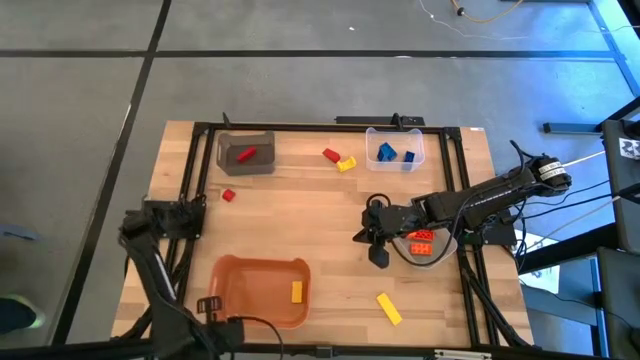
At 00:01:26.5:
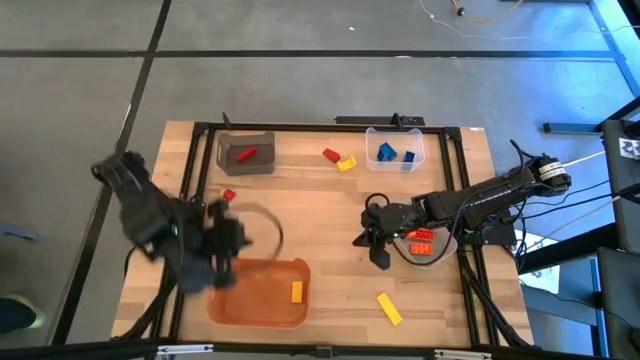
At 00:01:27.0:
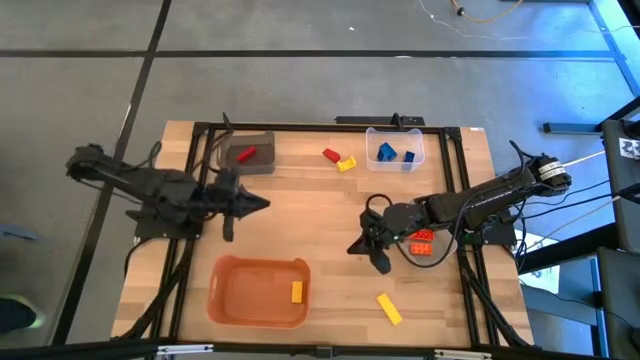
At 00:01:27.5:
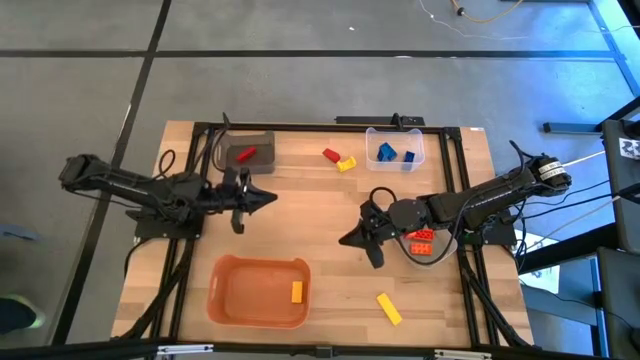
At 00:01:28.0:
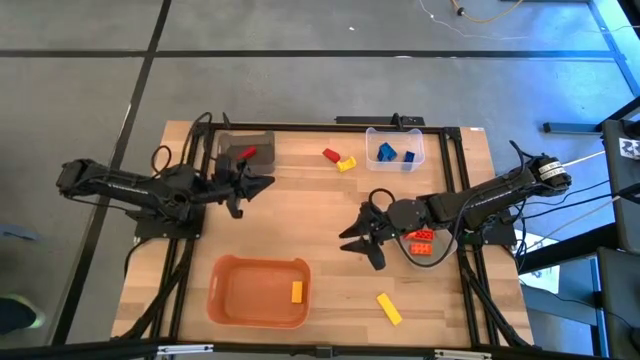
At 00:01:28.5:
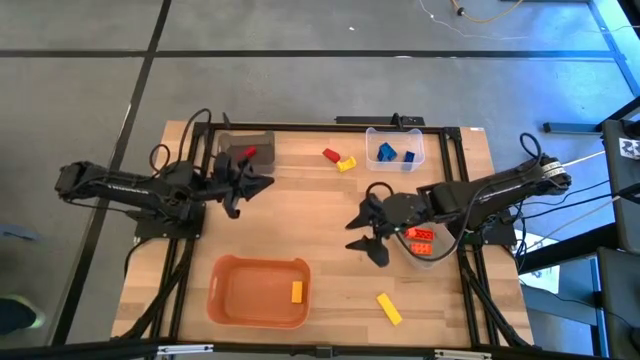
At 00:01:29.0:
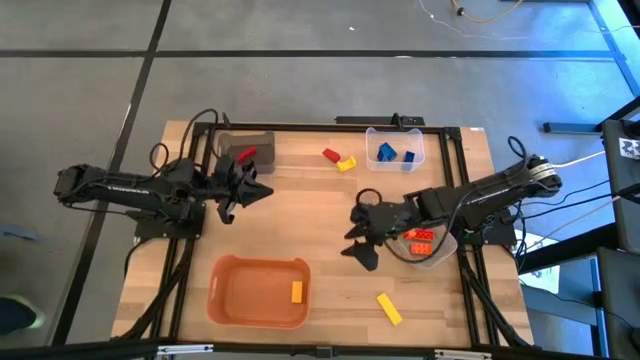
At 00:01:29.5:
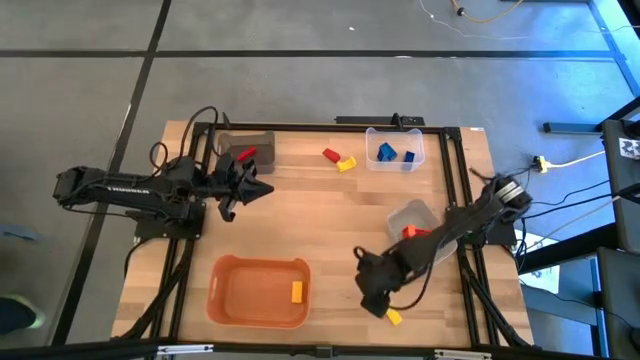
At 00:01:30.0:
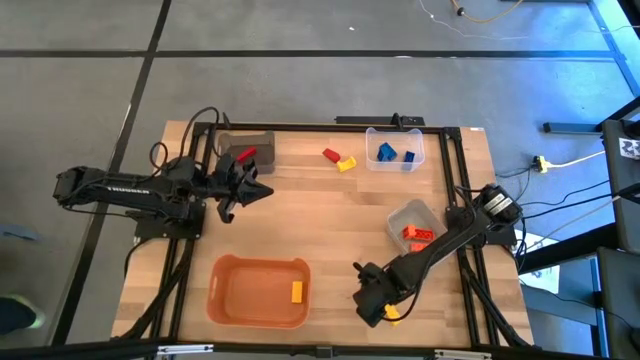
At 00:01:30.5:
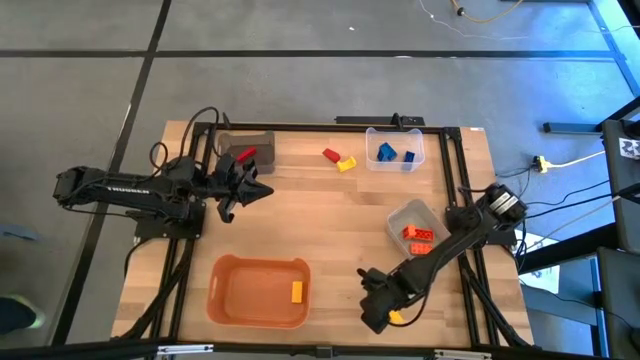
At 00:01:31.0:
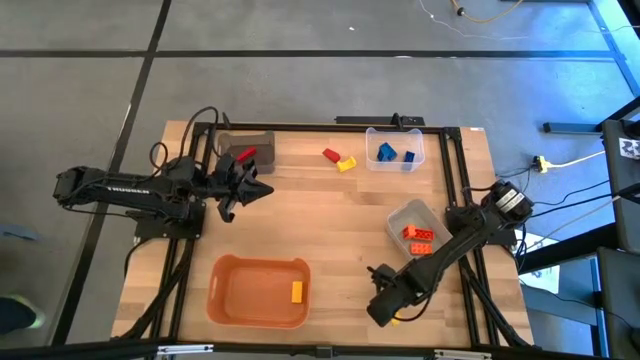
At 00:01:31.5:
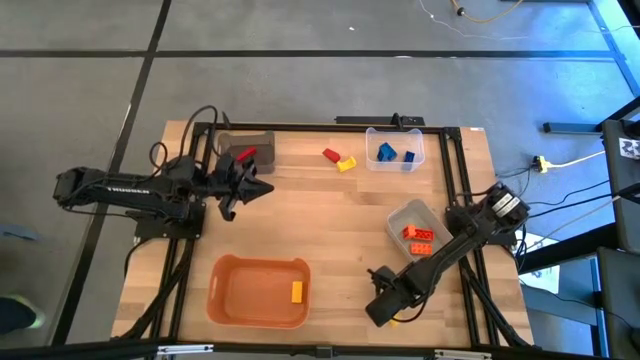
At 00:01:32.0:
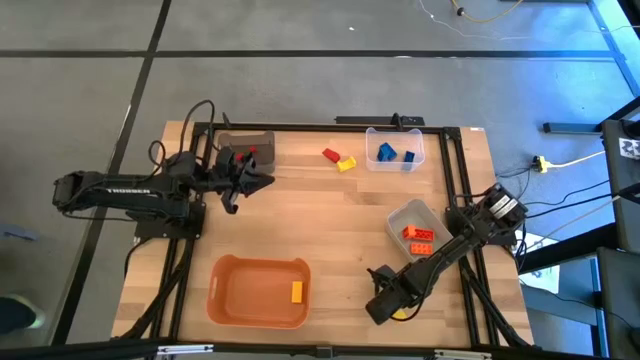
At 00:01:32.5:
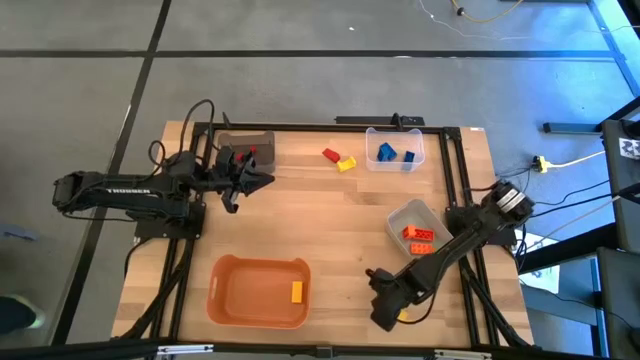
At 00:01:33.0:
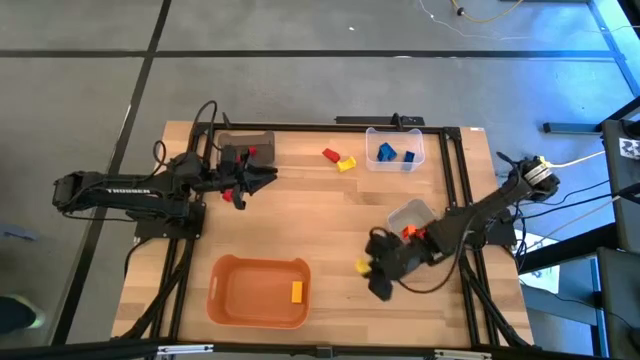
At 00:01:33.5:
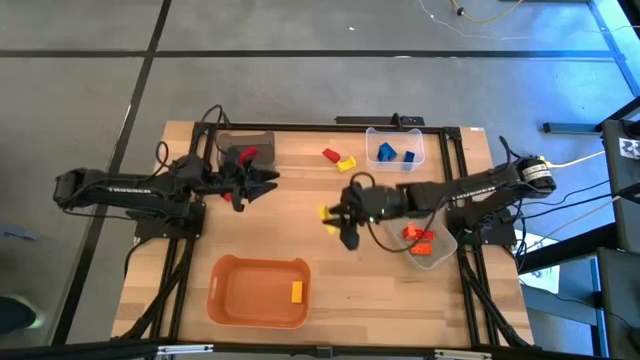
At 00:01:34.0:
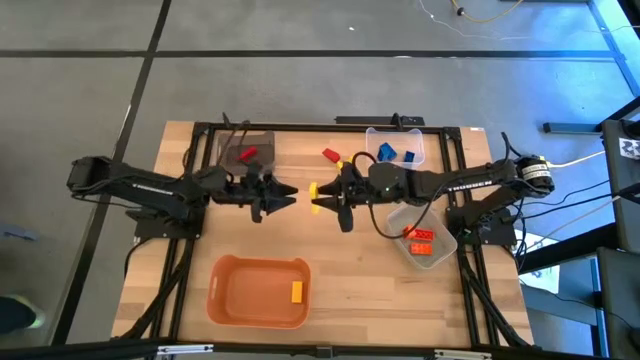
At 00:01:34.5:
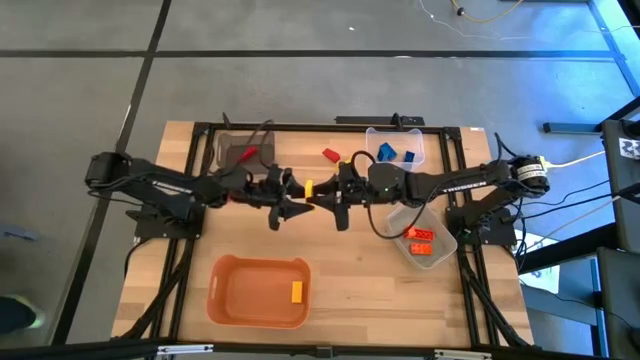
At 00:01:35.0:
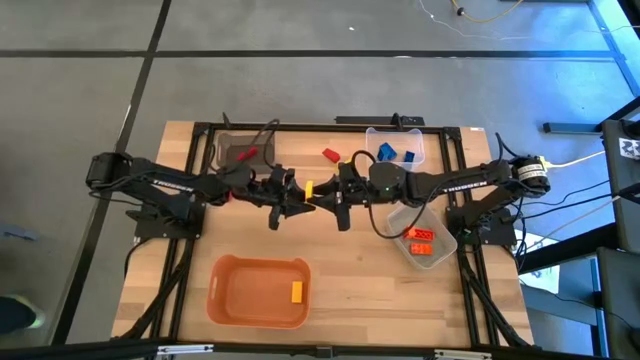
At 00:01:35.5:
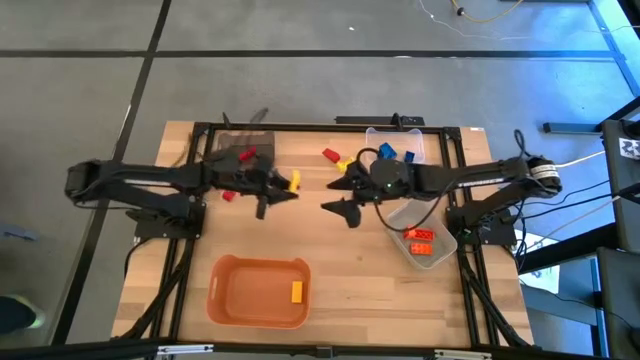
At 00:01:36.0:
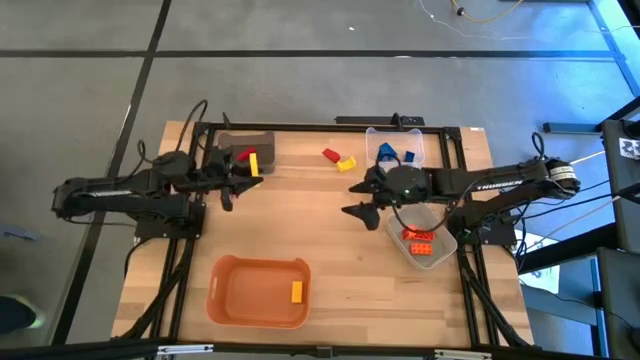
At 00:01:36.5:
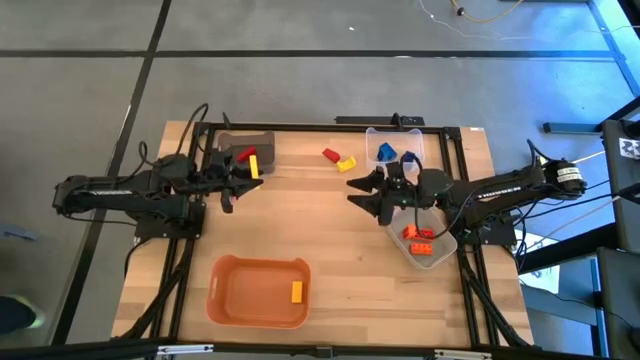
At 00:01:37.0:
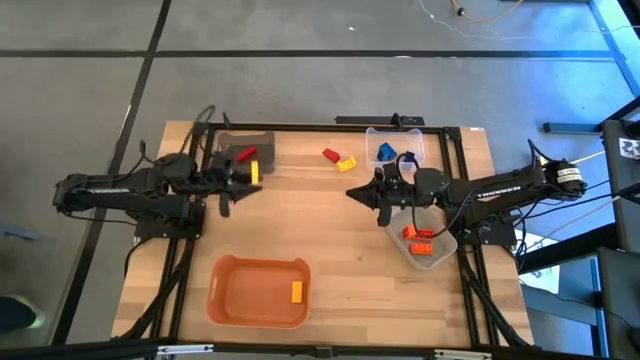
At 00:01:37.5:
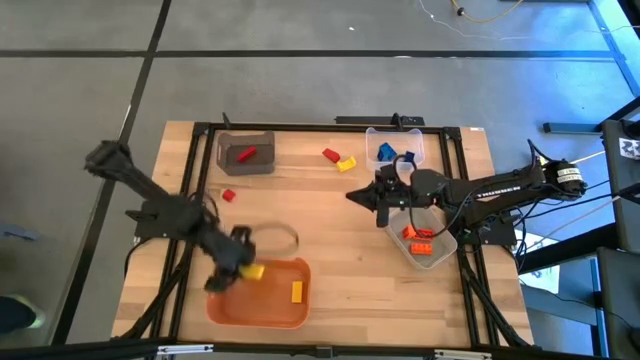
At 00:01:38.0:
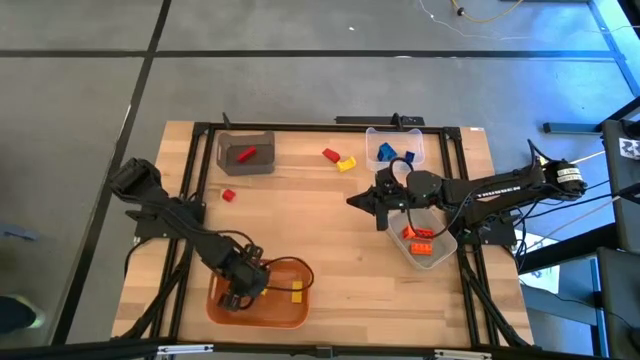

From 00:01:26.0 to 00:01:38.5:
Task: Sort & place blocks by color
Put the bottom yellow block into the orange bin

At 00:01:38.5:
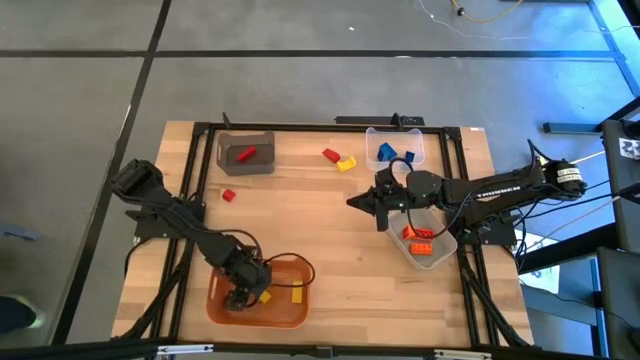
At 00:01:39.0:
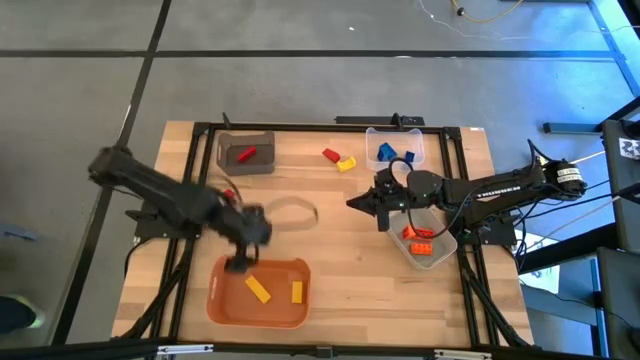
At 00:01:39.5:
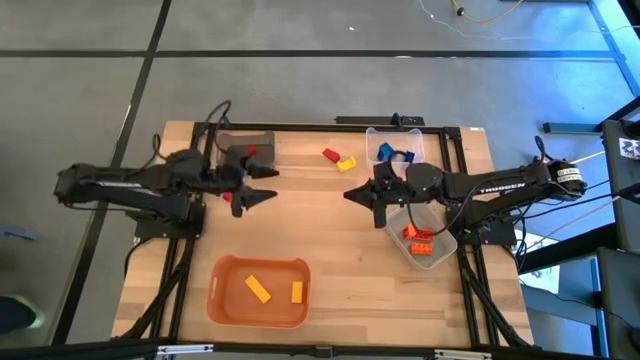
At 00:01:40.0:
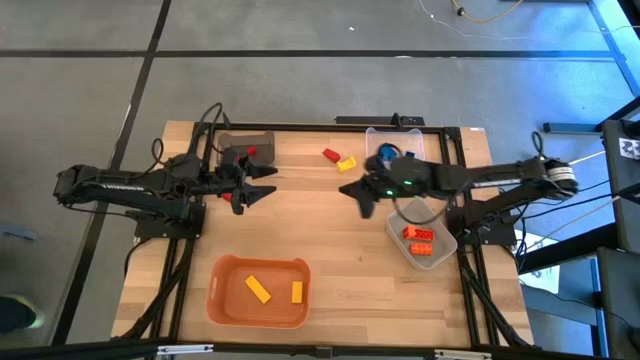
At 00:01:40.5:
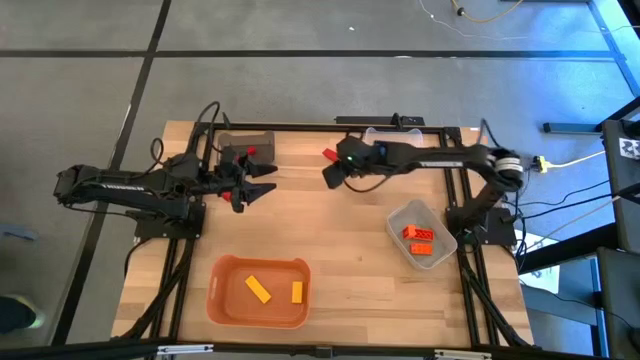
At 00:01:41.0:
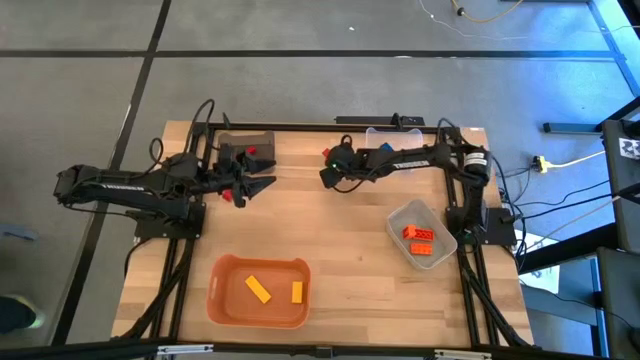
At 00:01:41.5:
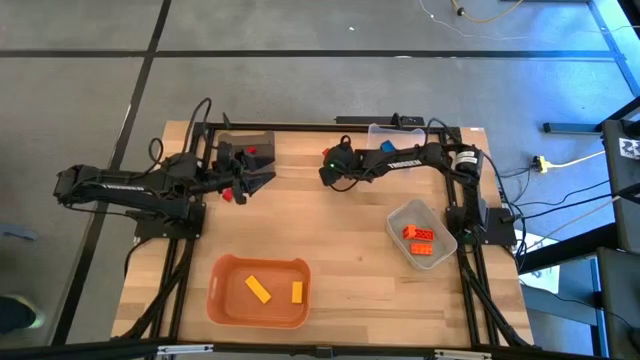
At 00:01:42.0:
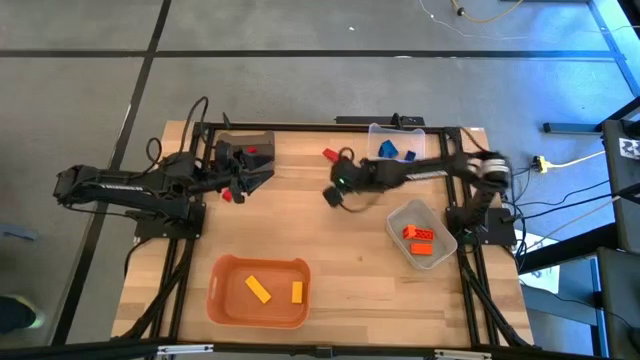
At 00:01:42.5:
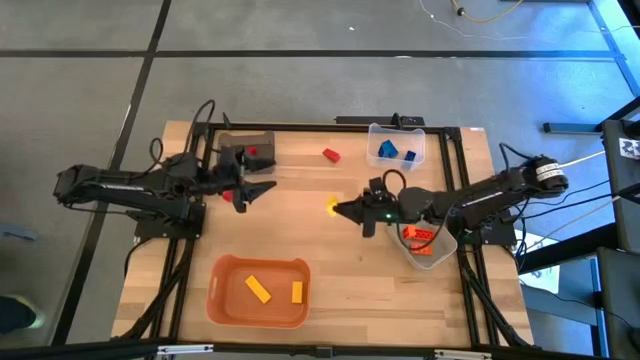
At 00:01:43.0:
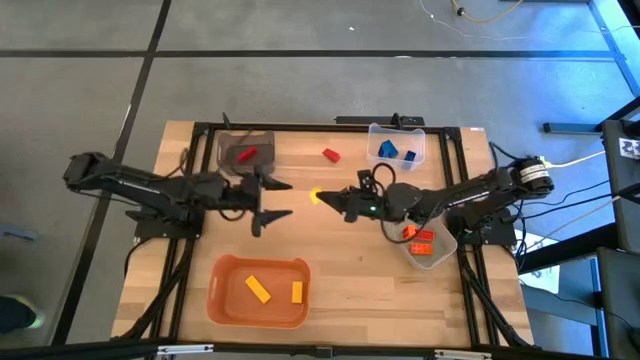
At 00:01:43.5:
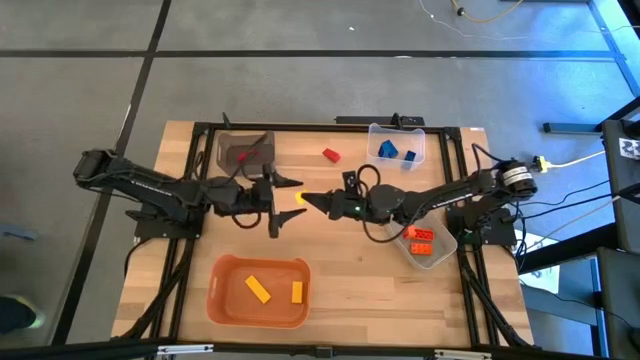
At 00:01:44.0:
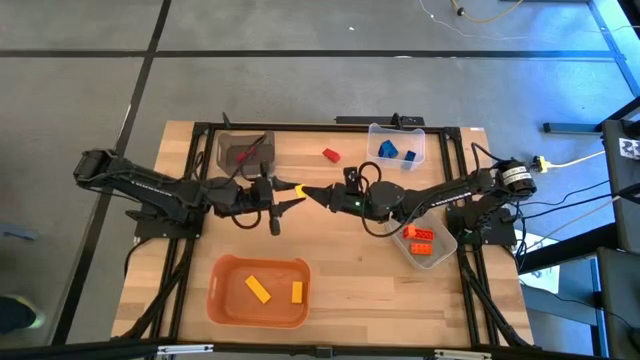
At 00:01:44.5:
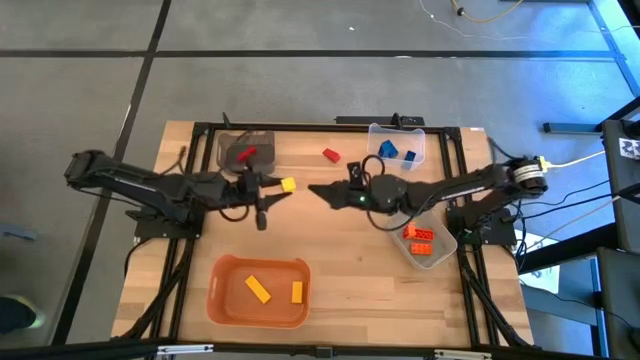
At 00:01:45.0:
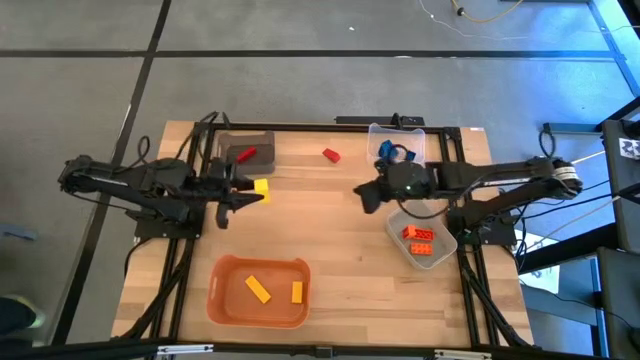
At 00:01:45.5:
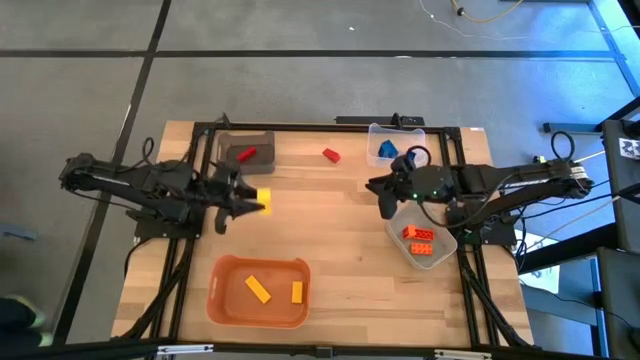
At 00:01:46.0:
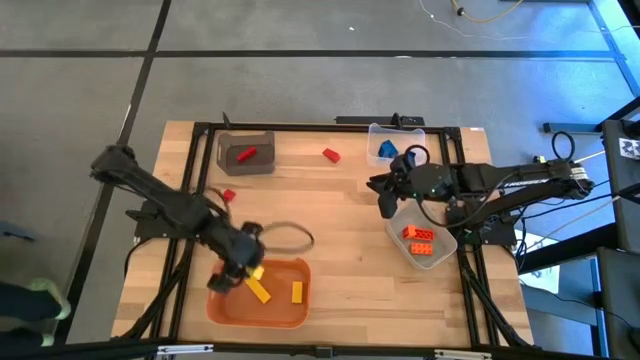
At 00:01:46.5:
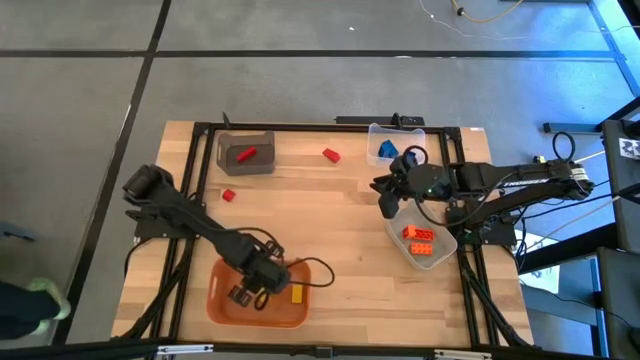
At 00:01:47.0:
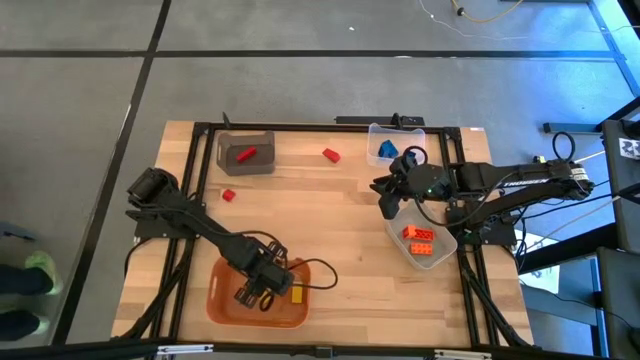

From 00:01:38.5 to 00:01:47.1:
Put the yellow block into the orange bin
